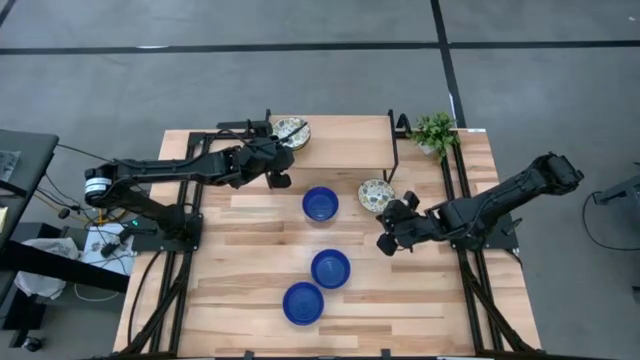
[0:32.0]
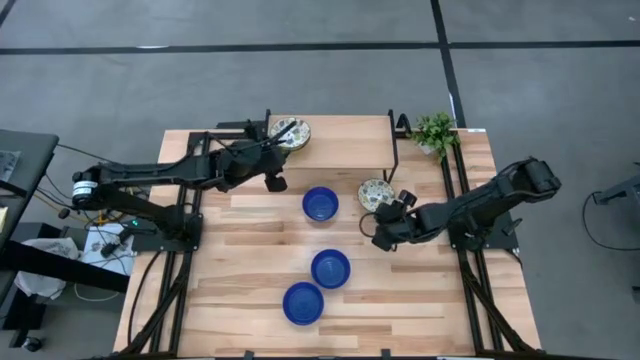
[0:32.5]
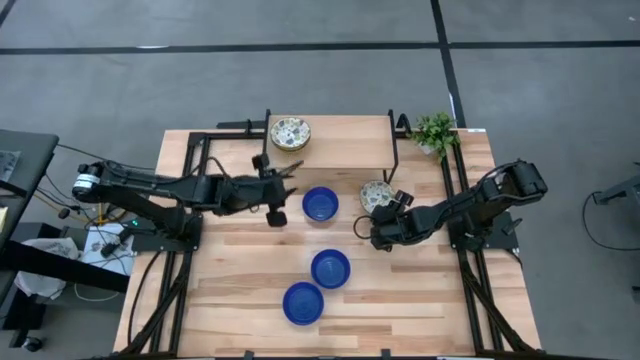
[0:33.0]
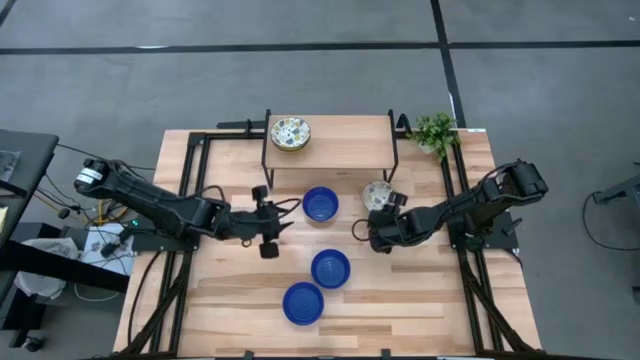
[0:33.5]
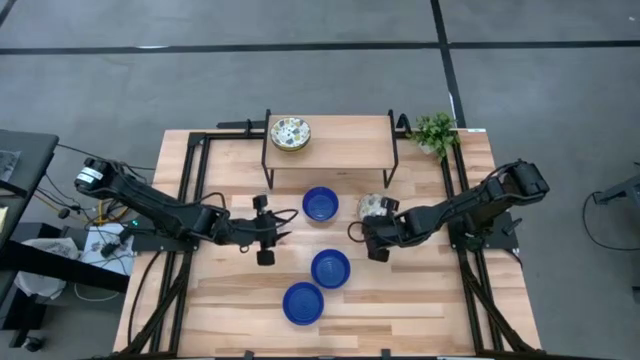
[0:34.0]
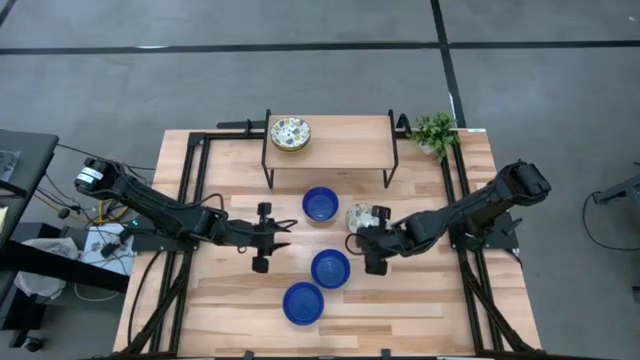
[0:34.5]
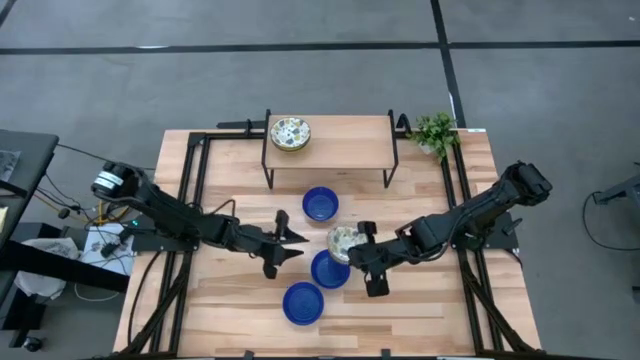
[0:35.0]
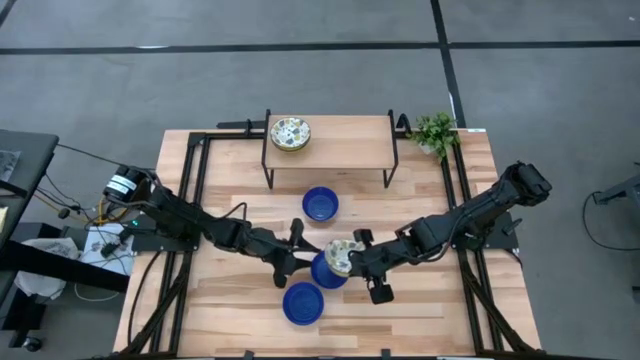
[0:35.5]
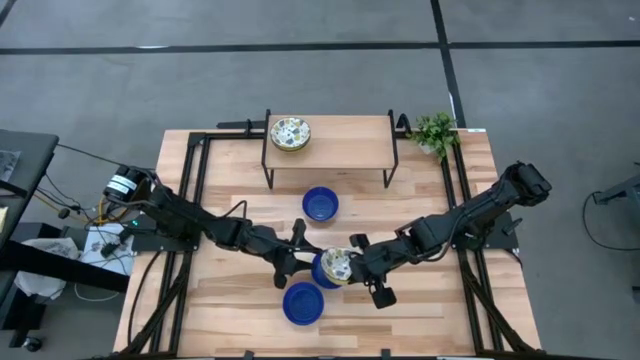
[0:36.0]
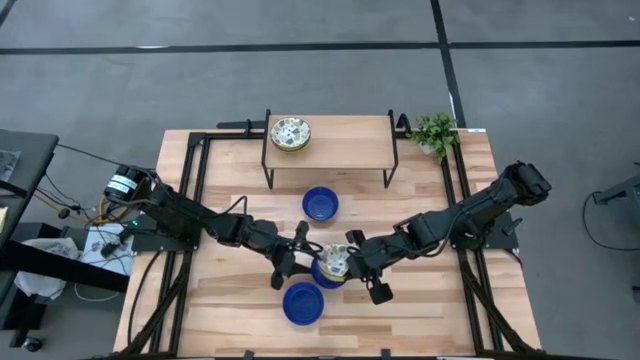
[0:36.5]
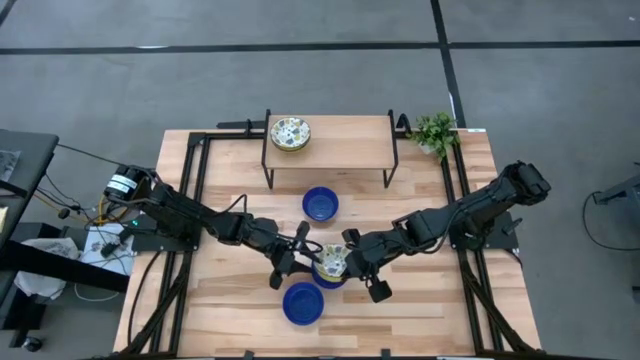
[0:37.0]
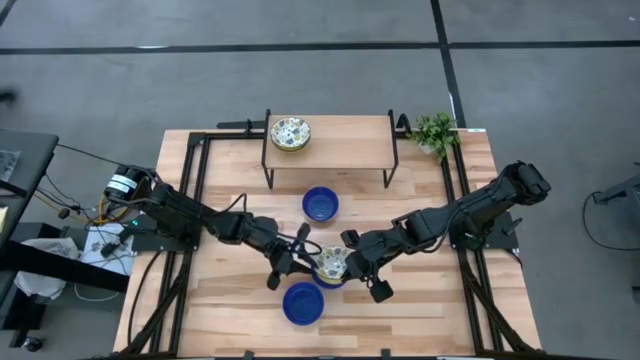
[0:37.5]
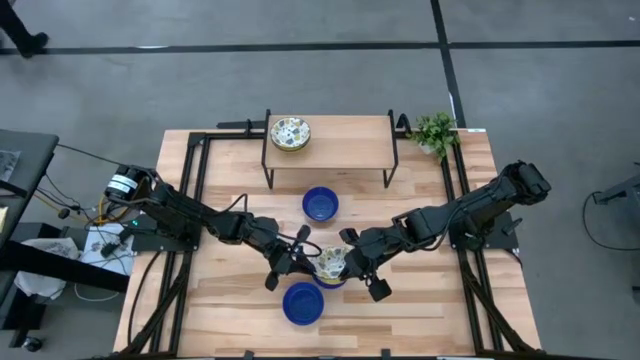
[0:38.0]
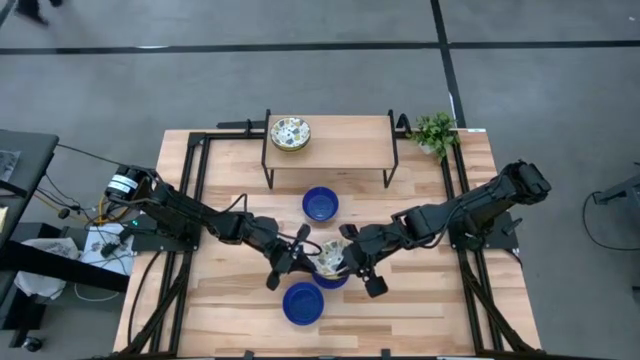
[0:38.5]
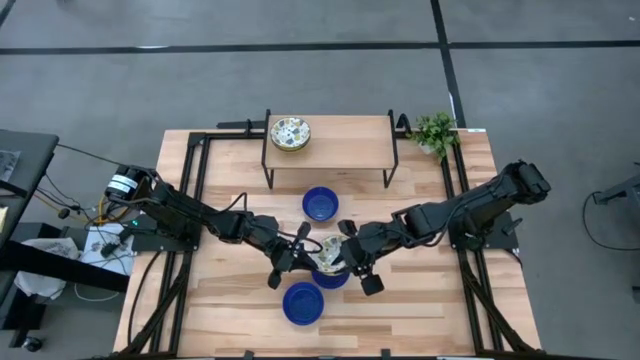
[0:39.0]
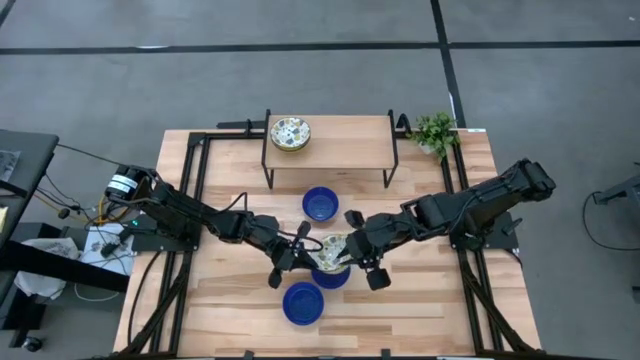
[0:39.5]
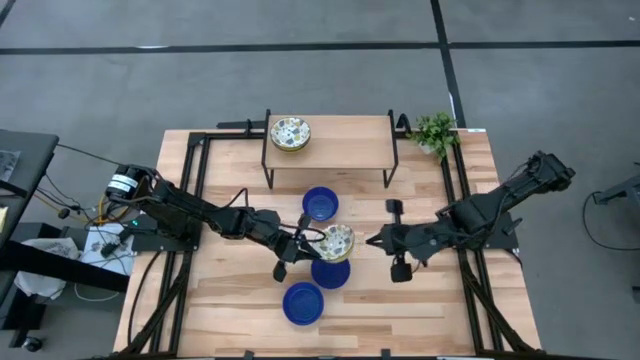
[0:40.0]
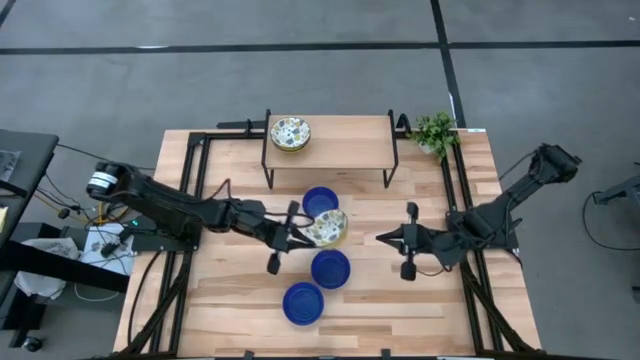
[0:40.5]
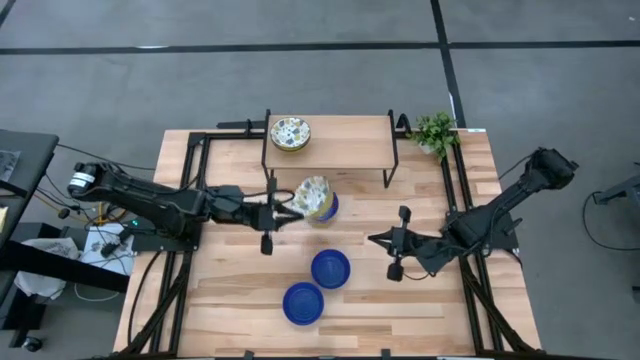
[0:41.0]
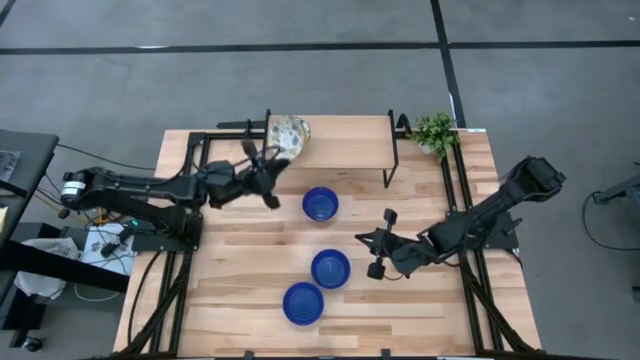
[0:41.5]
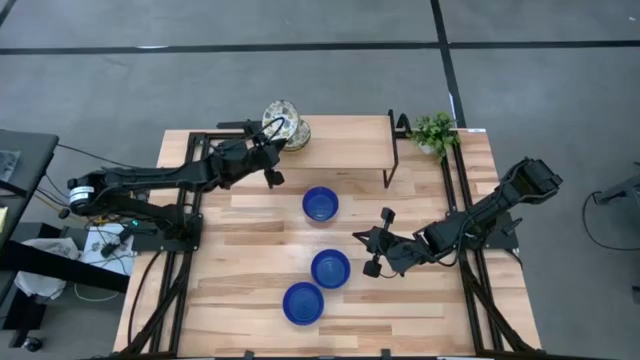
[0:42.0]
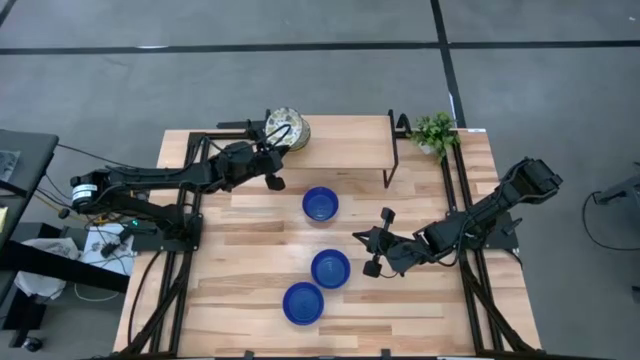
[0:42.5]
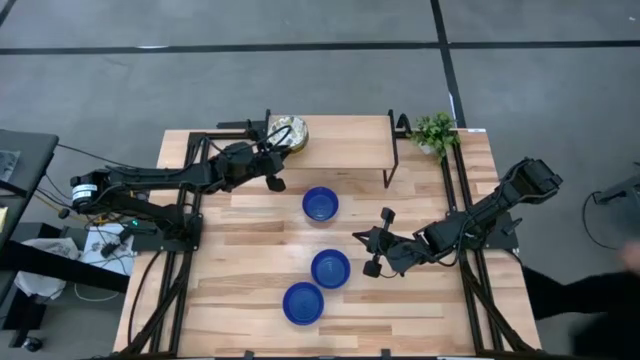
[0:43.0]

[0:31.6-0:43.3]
Task: Pick & Place Mini bowls
Stack the white patterned bowl on top of the stacked white patterned bowls on the shelf

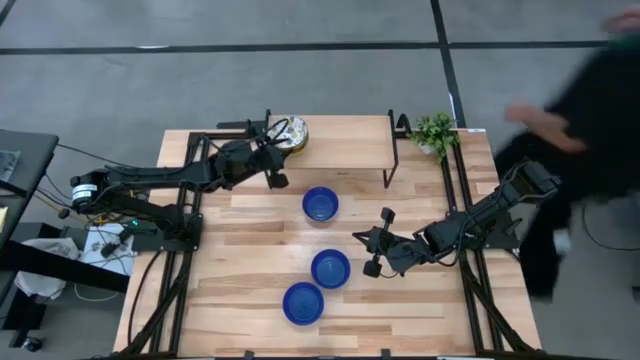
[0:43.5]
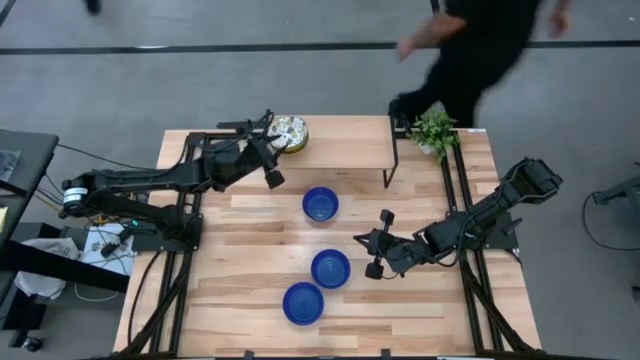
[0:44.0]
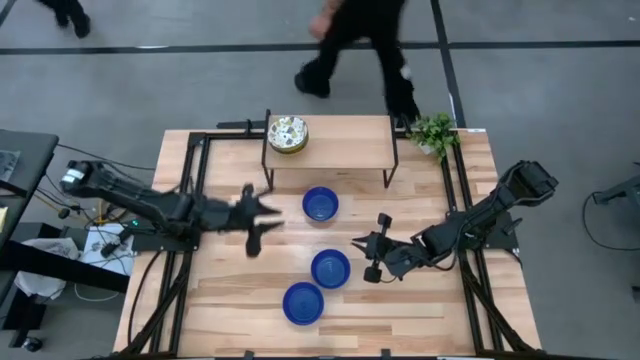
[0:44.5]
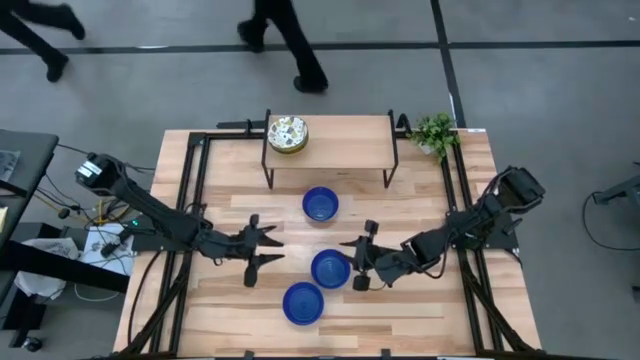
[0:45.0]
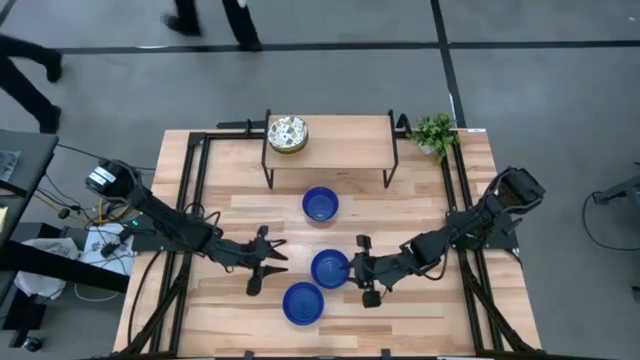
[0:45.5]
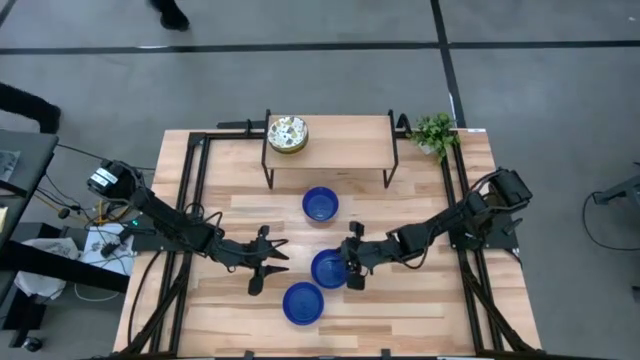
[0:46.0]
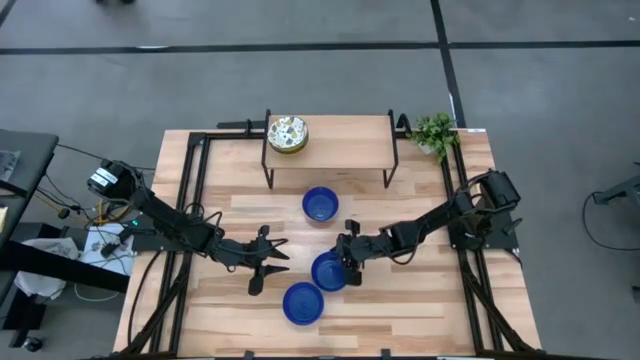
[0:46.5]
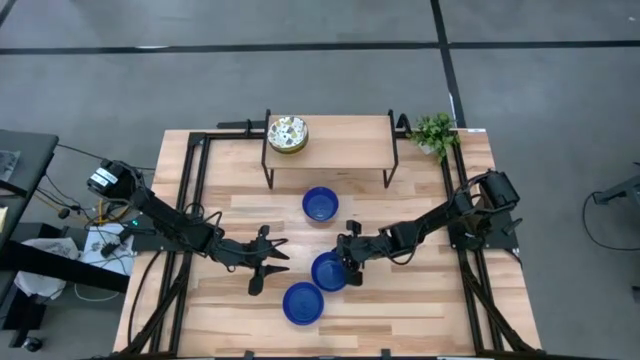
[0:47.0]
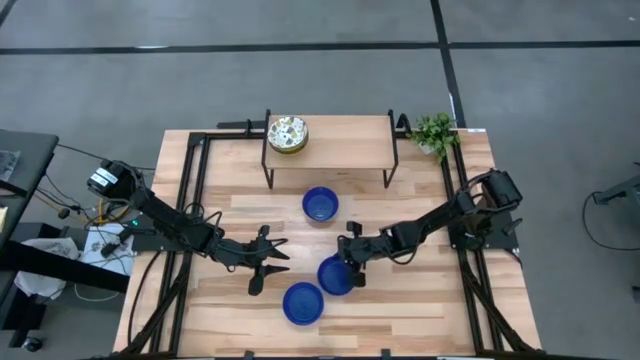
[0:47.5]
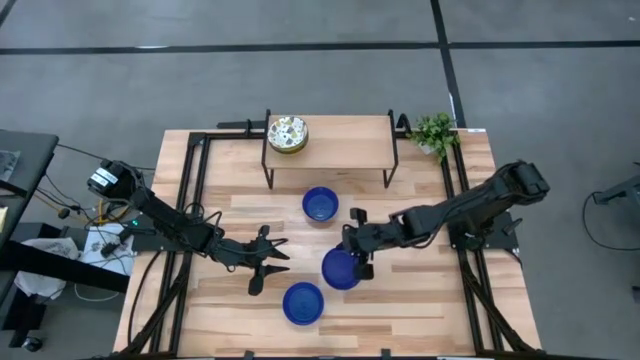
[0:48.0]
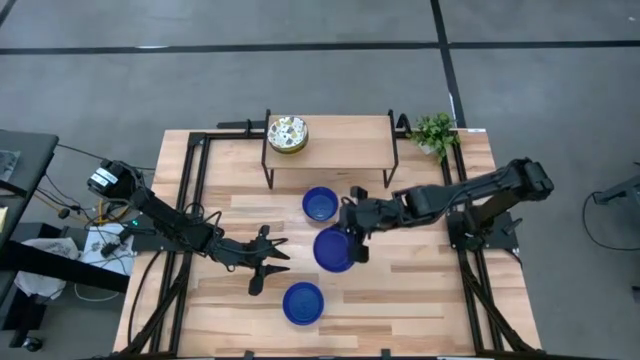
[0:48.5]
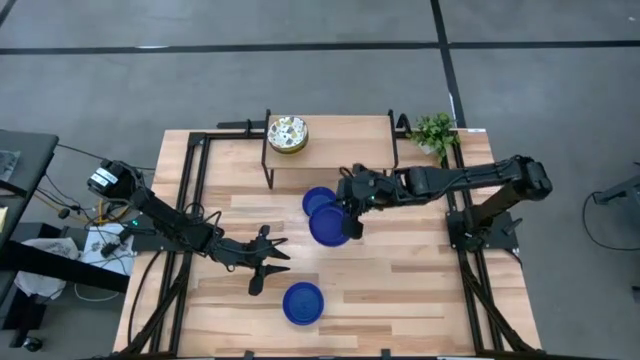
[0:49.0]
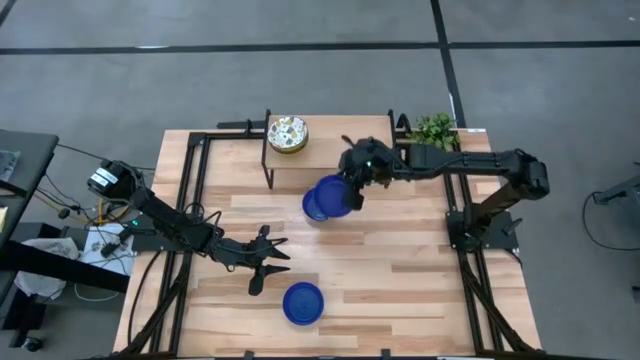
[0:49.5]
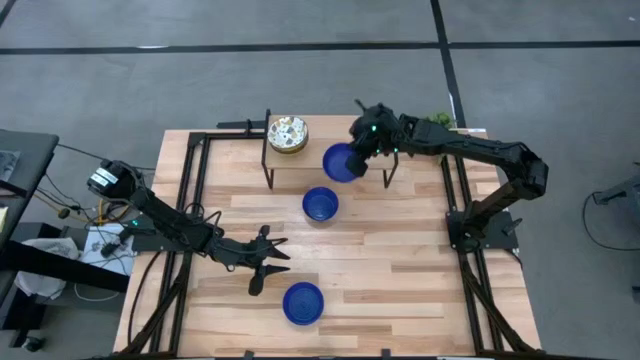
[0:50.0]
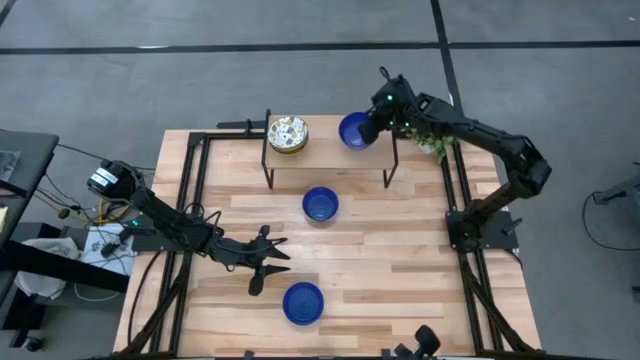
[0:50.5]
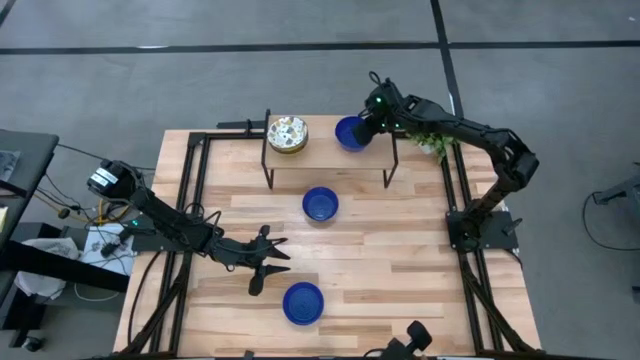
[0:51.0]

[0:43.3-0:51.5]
Put the middle blue bowl on the shelf
